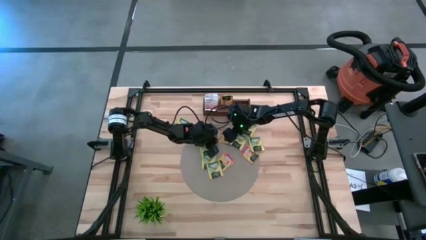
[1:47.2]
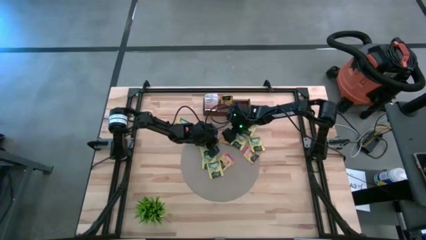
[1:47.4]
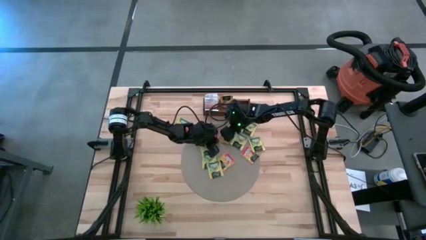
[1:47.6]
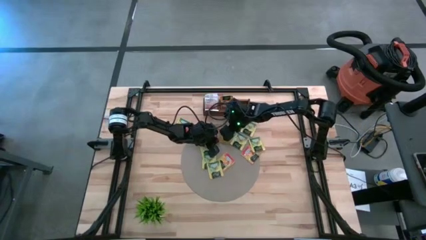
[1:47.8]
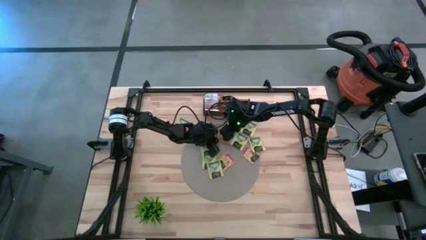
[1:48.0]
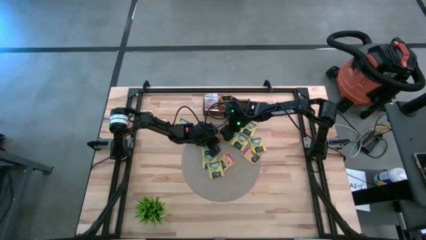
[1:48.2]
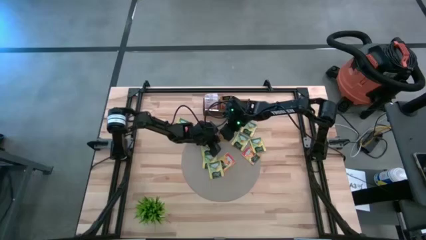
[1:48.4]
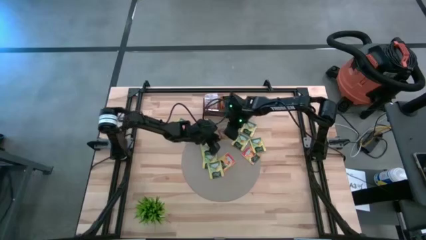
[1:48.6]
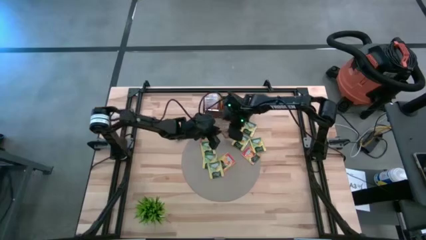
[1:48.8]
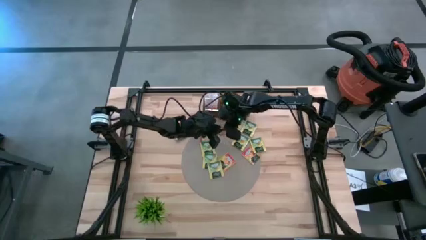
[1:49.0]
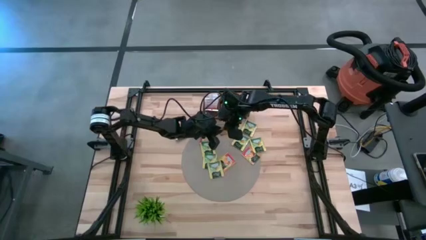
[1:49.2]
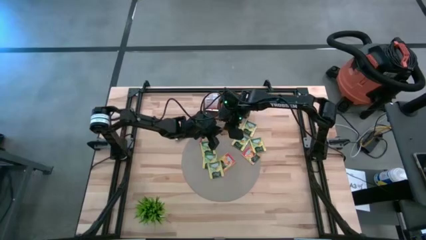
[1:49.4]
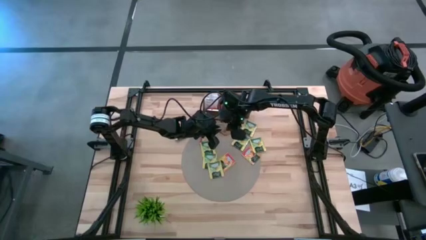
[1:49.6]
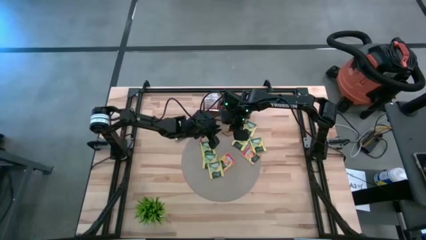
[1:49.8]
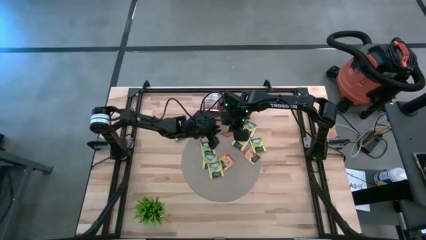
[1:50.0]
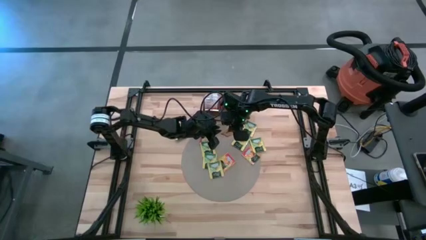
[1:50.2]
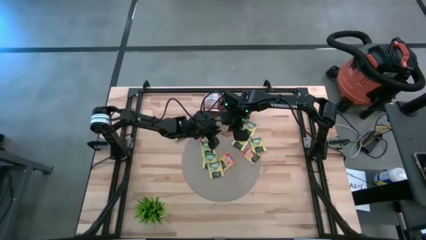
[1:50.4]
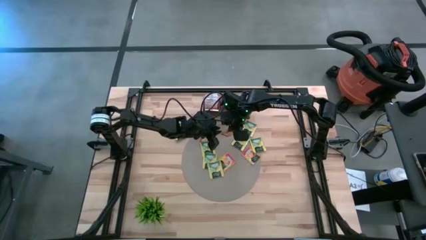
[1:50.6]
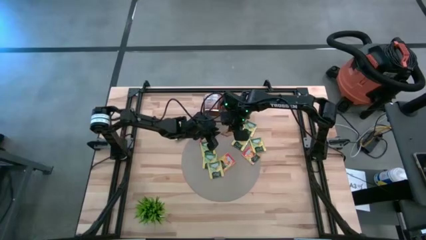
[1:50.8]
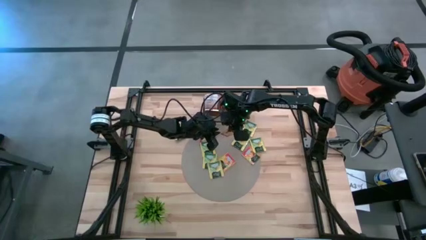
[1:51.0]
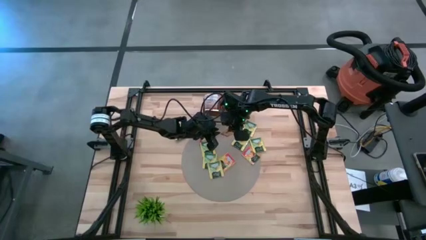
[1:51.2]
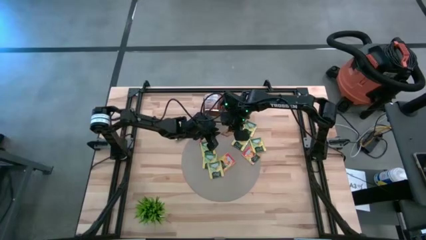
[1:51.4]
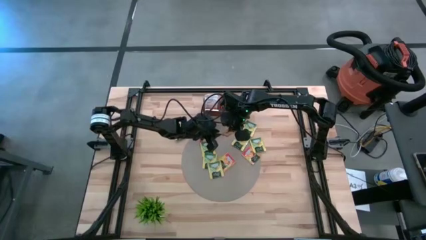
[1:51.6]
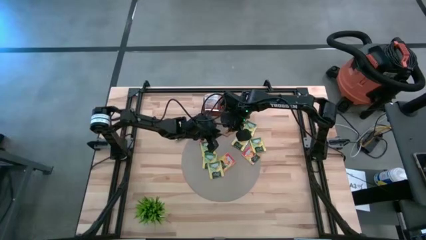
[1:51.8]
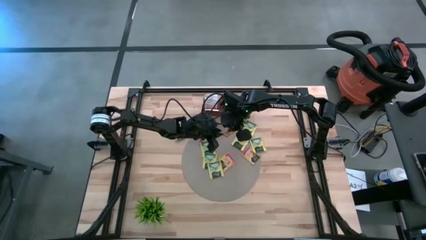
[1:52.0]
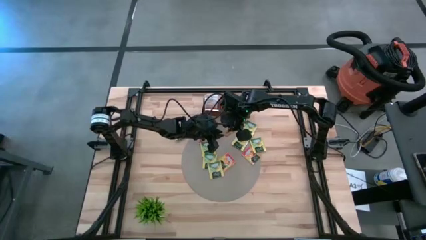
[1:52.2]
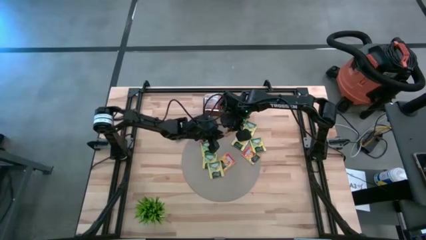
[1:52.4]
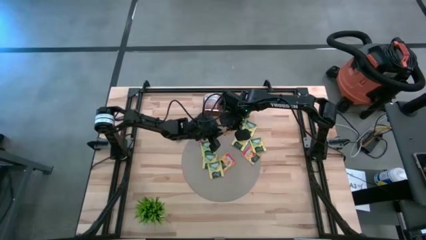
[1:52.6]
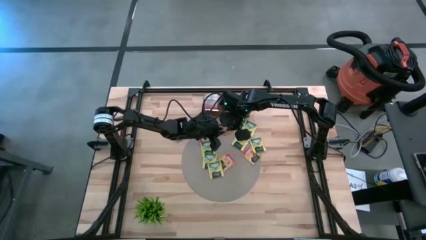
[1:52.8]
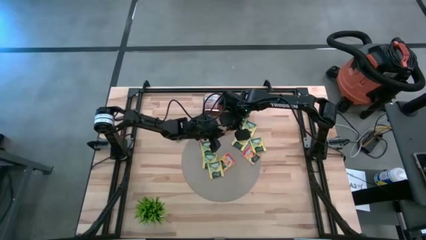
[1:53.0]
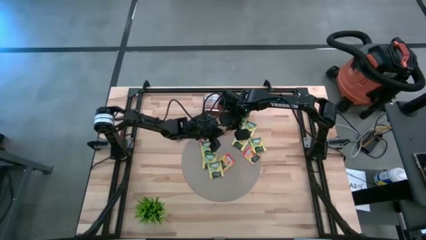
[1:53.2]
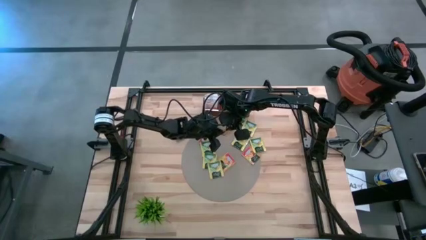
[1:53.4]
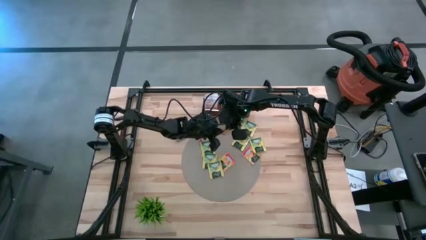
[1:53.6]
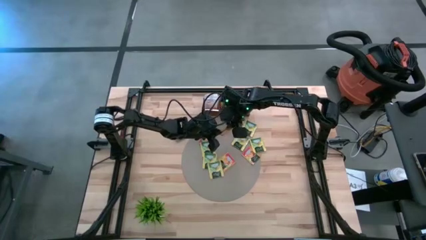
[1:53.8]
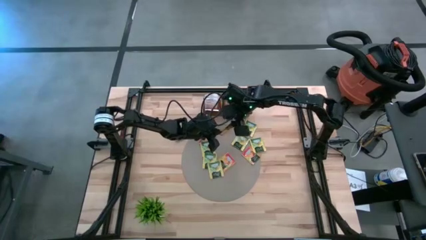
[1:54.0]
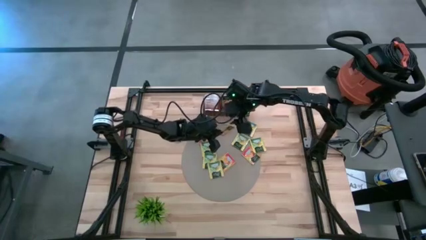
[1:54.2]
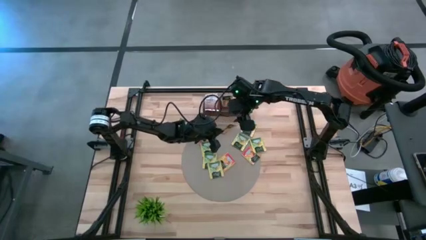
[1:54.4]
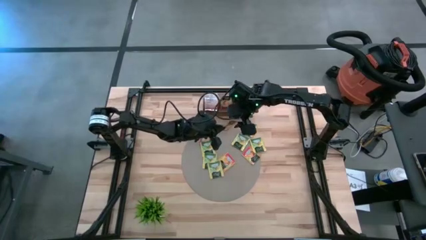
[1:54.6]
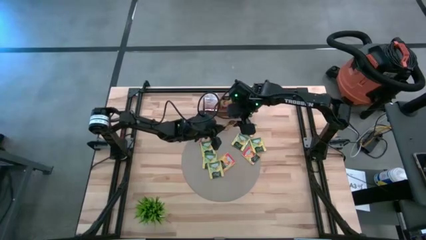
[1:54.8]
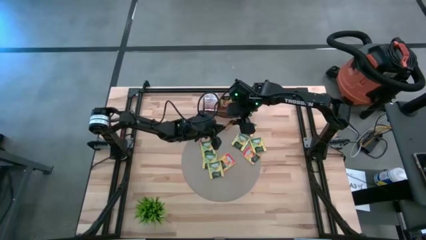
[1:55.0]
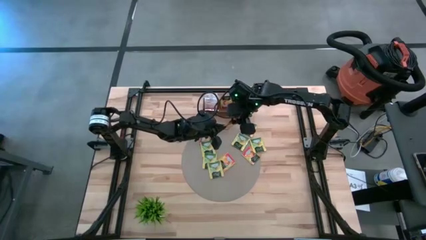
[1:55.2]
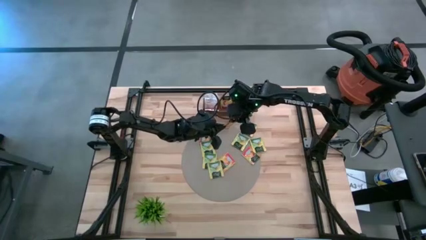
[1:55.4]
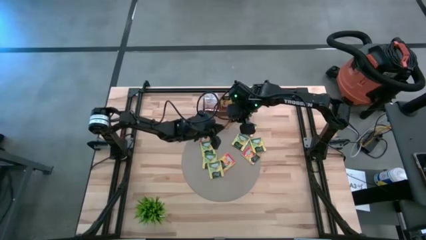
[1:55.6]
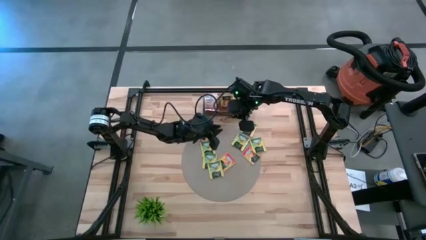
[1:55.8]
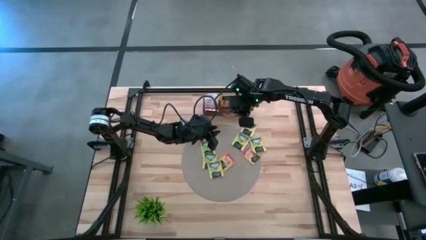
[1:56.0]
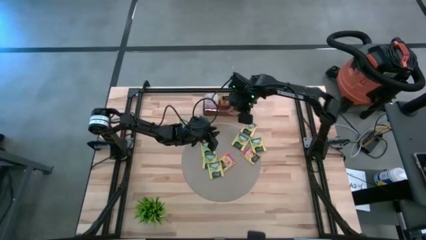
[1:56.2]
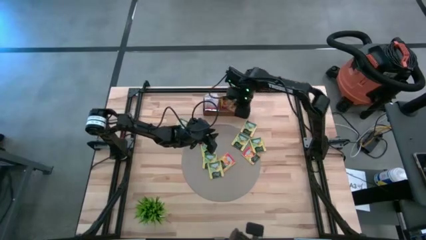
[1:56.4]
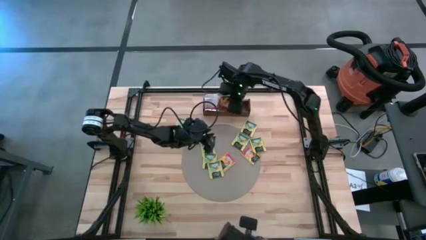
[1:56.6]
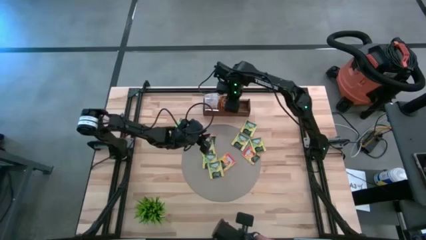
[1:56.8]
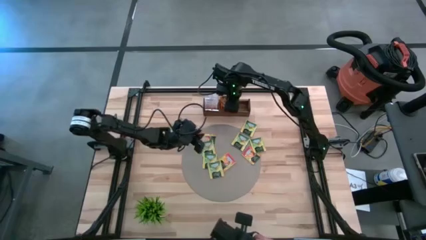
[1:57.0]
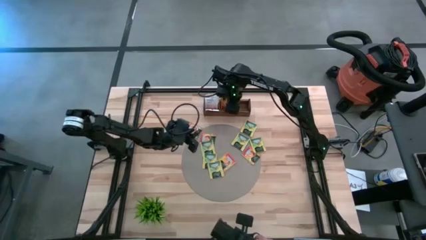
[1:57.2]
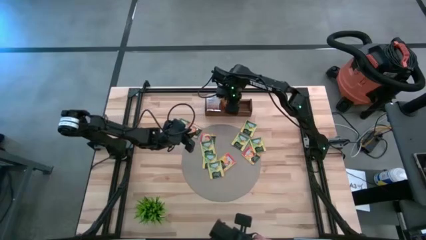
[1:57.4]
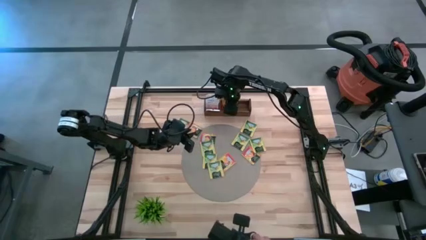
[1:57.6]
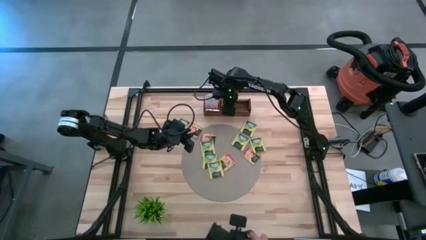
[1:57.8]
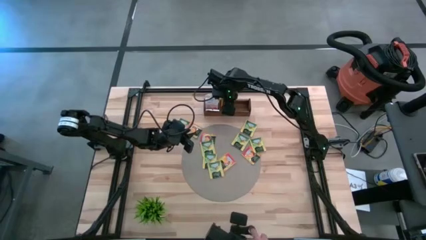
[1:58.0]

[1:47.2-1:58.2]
Task: Pick & Place Tea
Put the orange tea bag into the middle section of the wooden organizer
